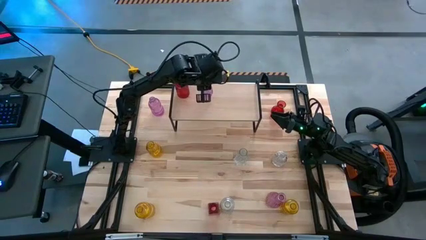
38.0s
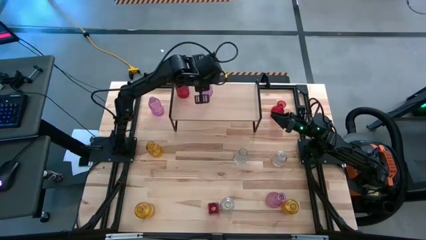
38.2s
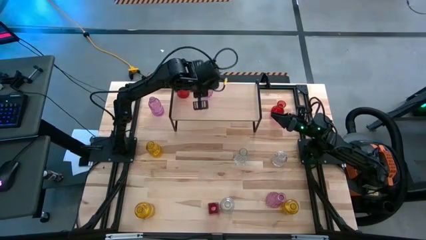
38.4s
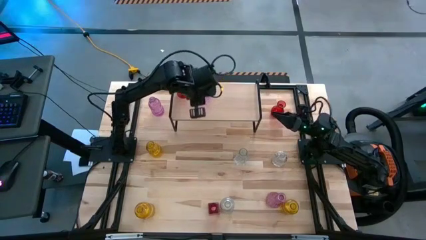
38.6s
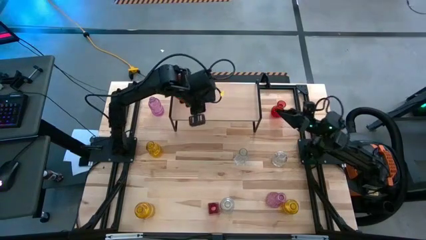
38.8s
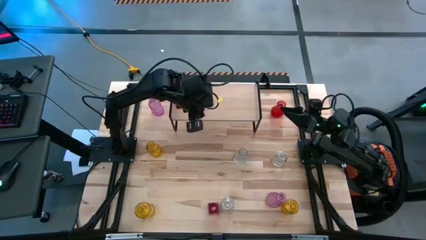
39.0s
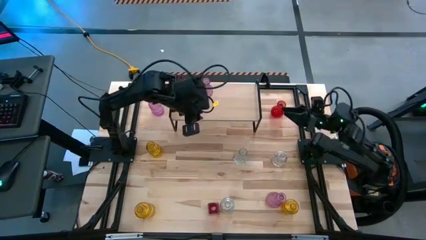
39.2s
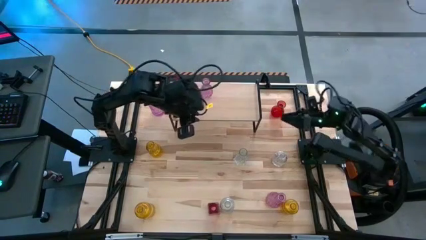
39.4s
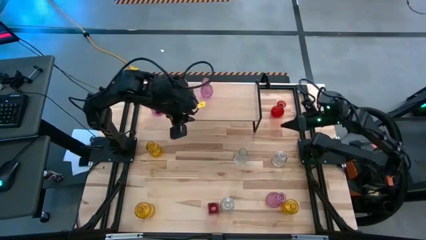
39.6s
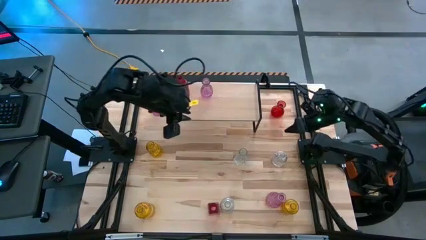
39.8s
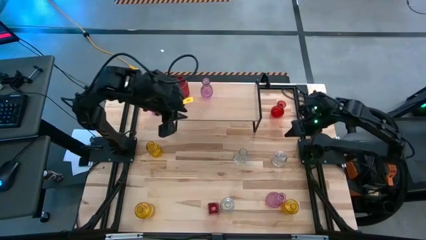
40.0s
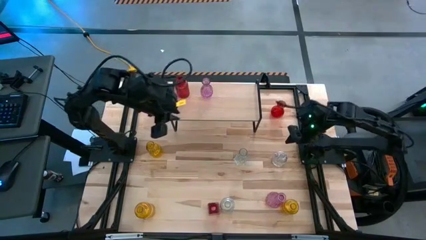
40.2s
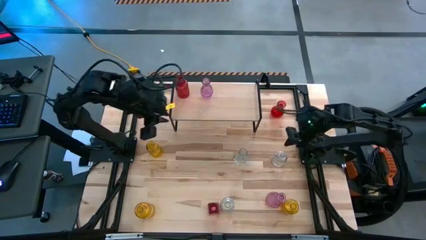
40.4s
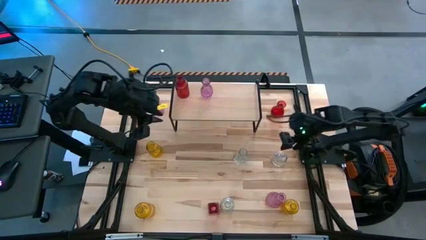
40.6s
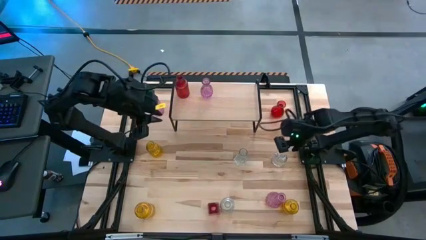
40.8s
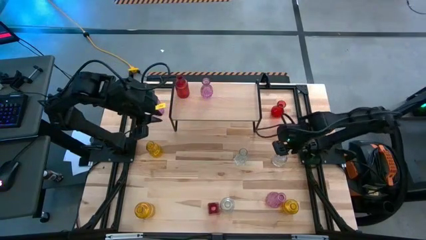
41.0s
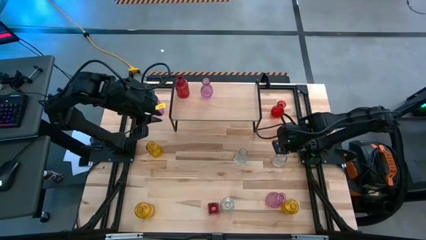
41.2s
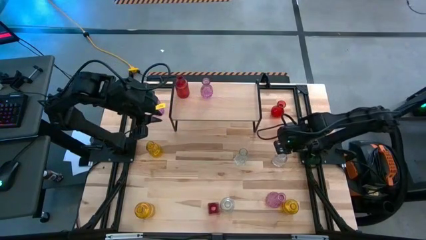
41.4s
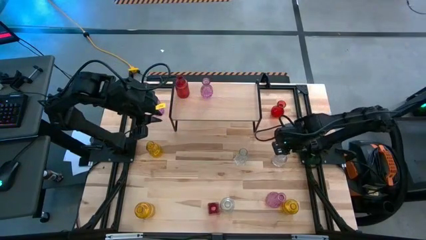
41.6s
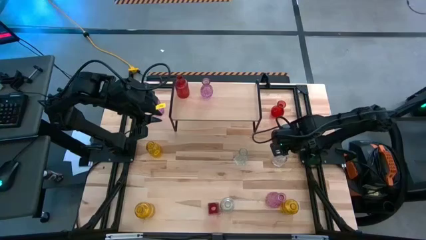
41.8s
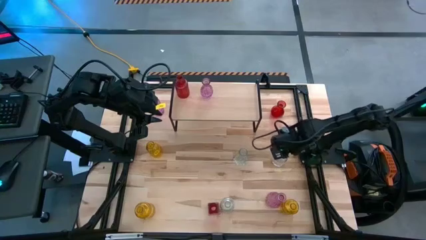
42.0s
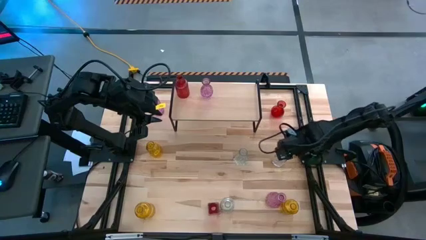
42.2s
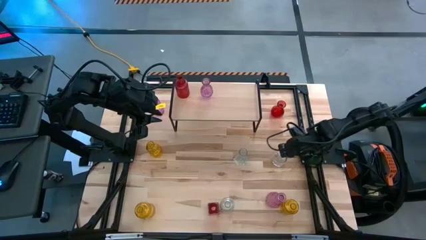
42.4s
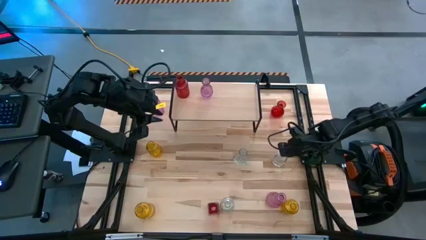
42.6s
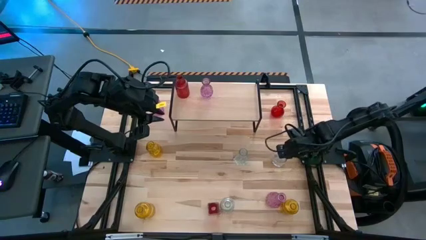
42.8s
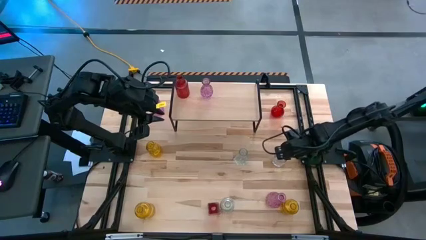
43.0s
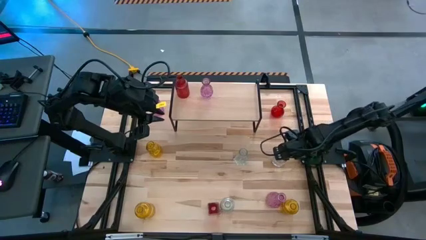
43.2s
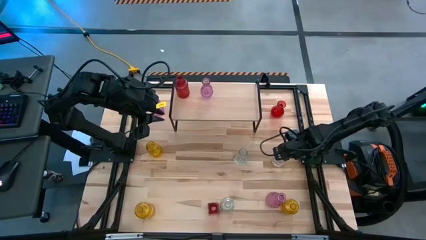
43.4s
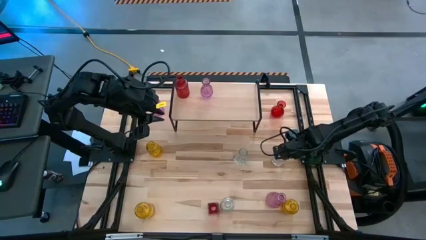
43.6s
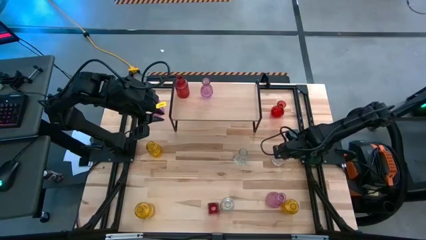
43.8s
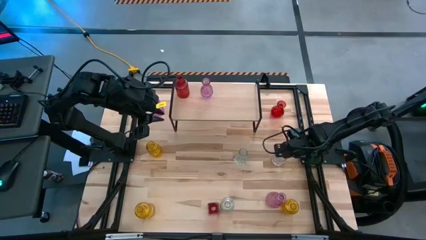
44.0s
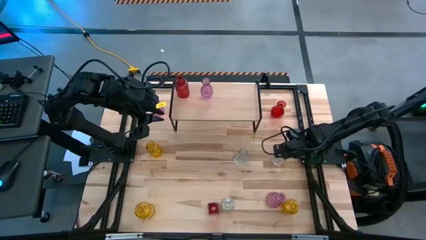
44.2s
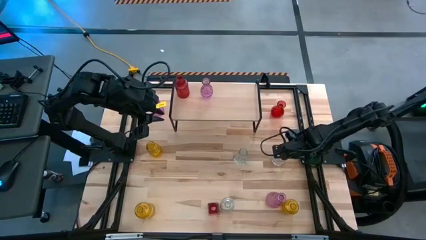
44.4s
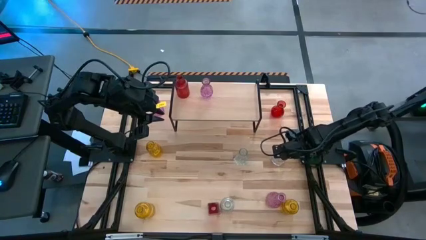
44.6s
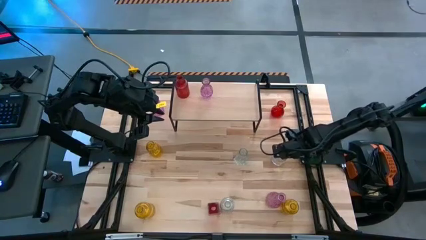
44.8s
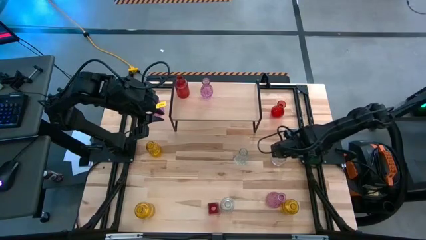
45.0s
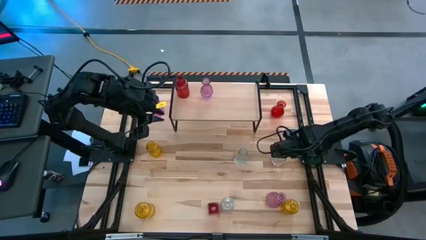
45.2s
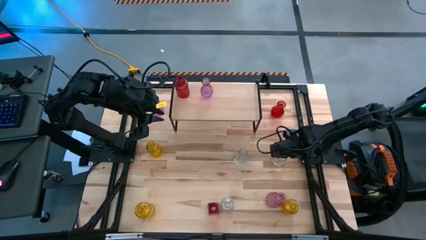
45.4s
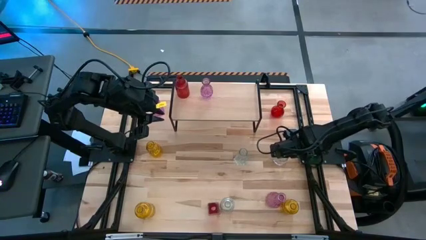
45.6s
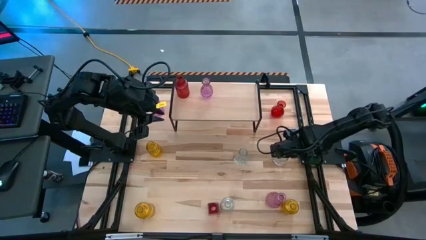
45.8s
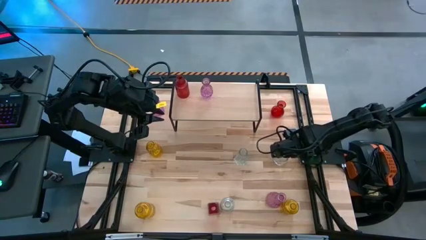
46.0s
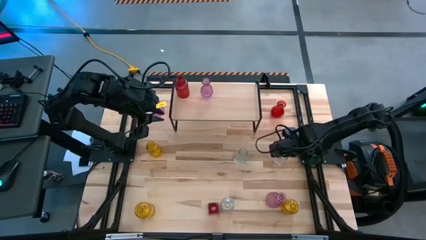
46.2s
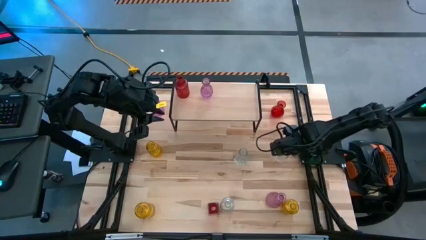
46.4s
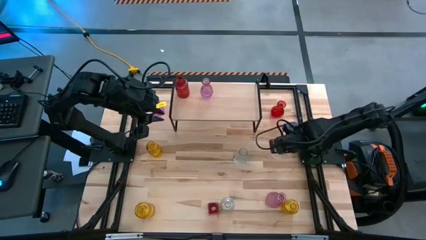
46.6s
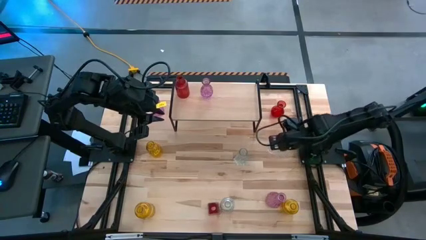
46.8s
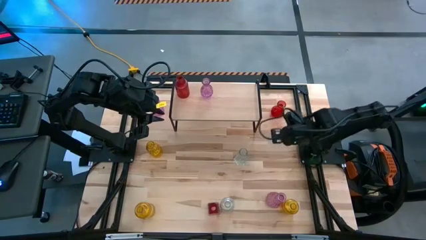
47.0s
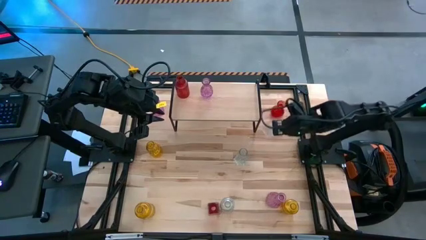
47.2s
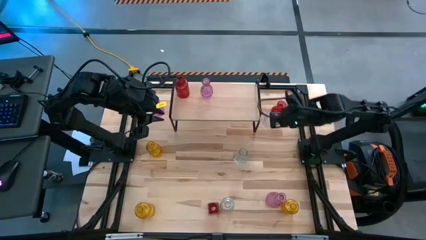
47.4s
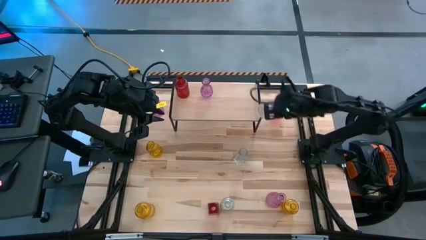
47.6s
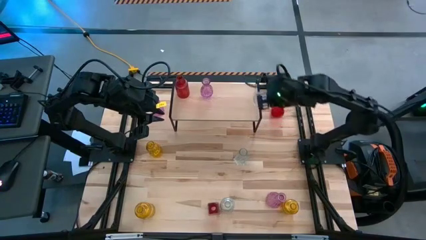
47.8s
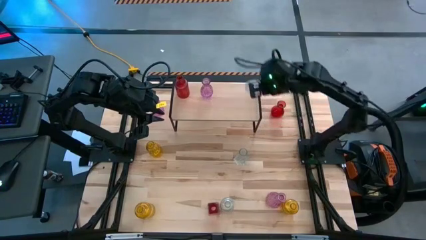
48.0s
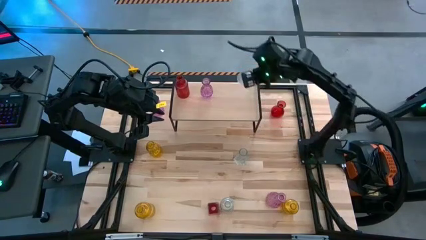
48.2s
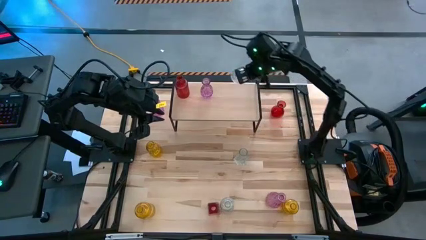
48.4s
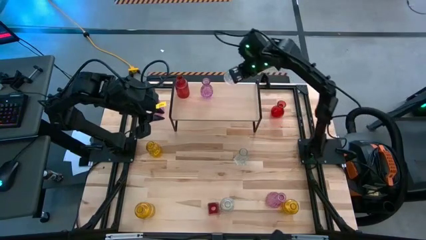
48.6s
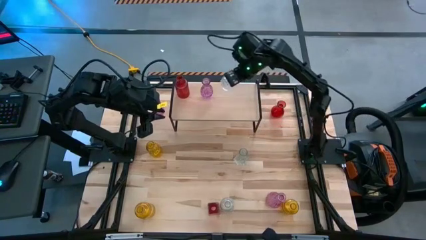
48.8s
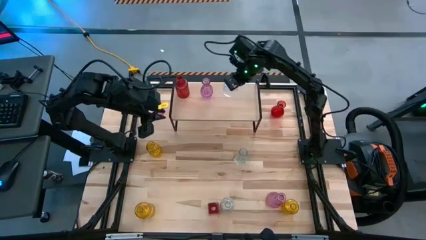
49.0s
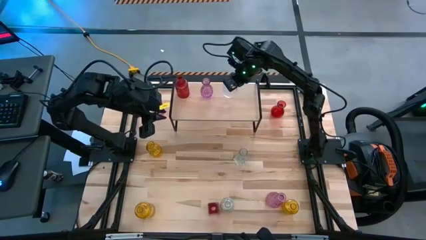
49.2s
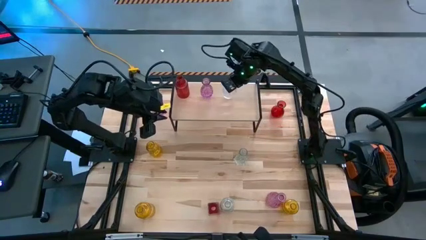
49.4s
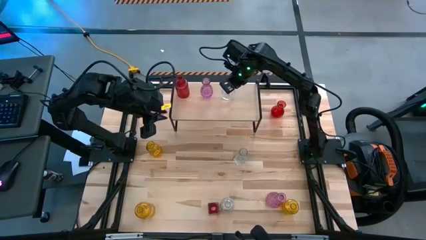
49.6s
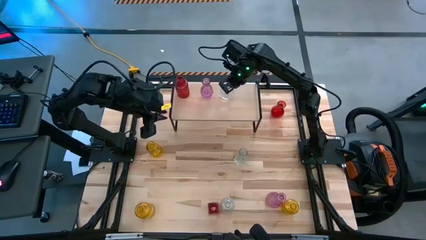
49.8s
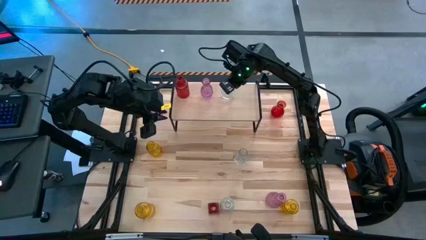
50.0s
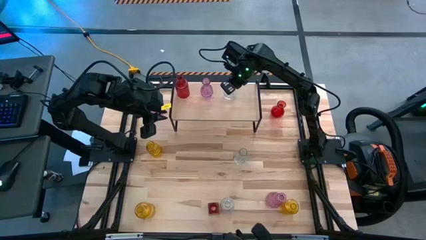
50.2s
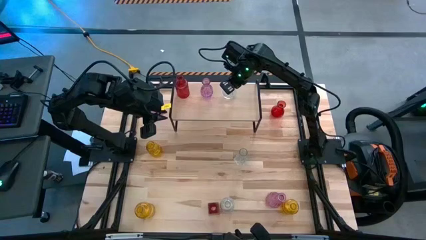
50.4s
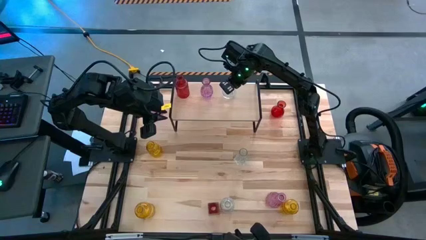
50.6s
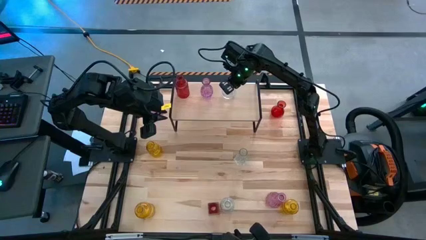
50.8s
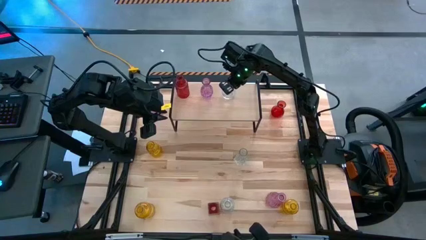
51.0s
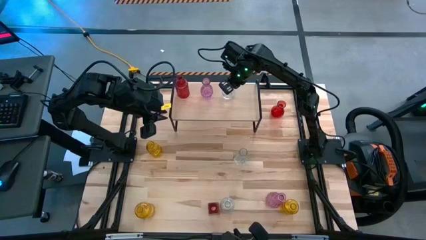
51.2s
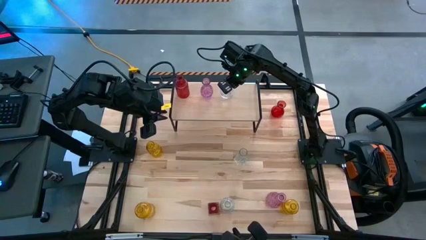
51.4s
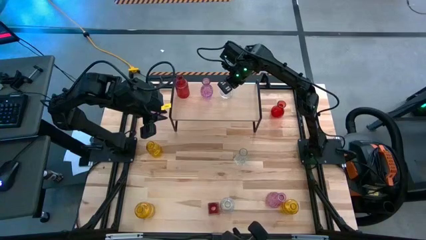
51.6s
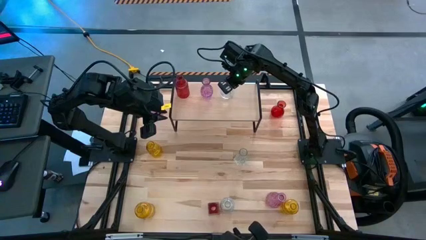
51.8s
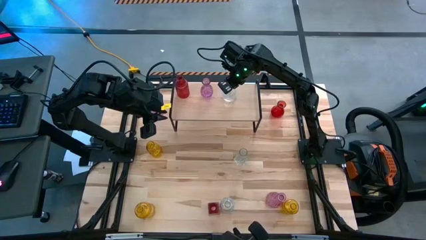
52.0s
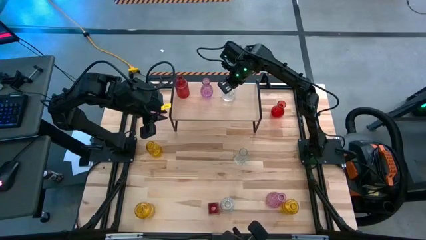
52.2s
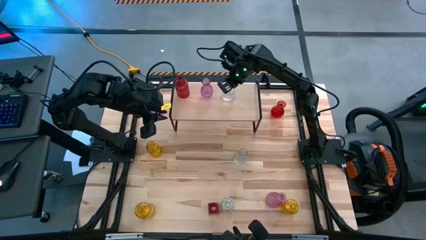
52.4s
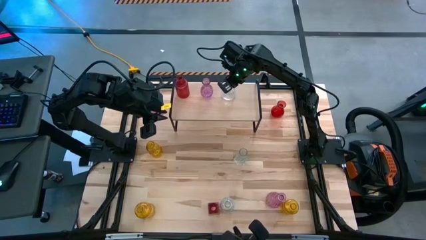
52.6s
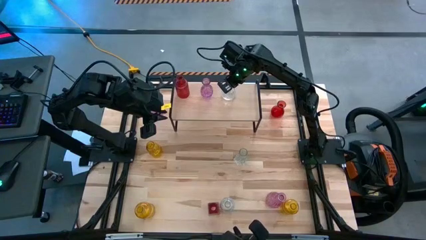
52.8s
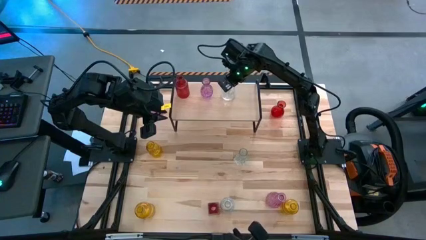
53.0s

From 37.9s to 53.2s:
Task: sort vases onto shelf
Put the top right transparent vase on the shelf
